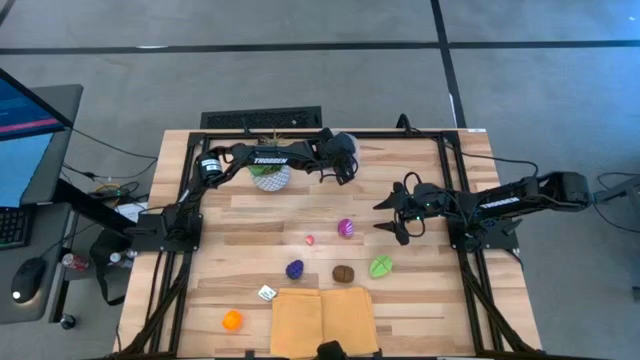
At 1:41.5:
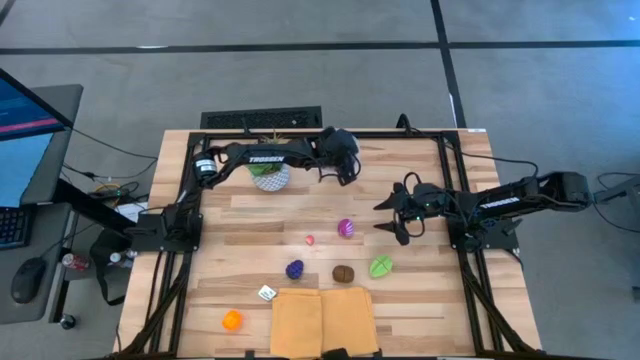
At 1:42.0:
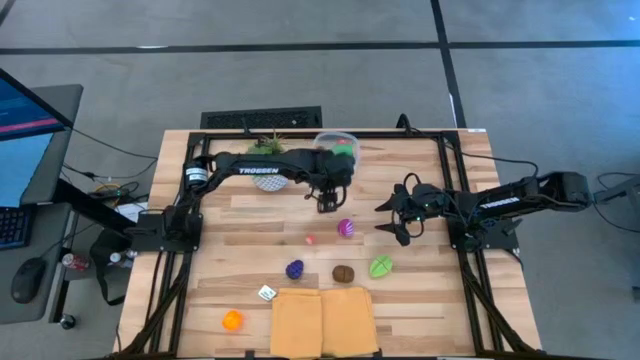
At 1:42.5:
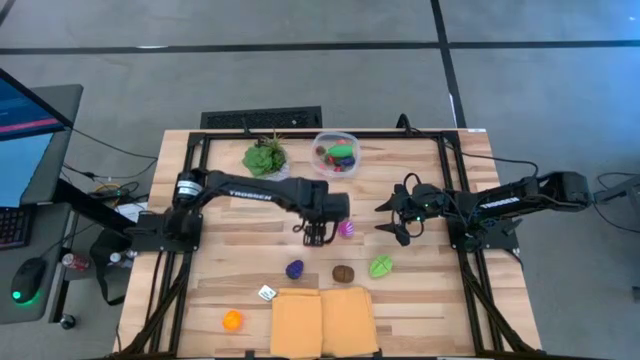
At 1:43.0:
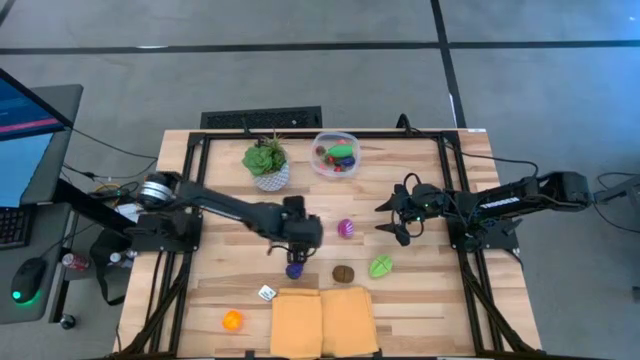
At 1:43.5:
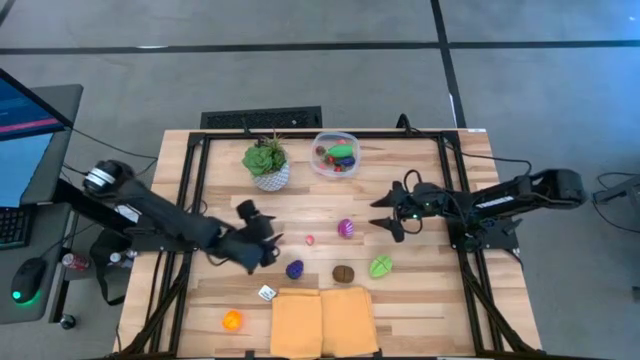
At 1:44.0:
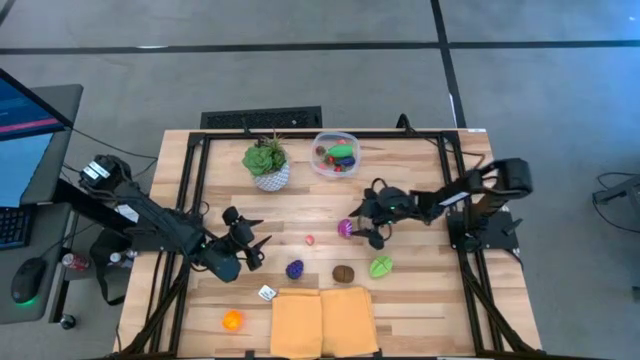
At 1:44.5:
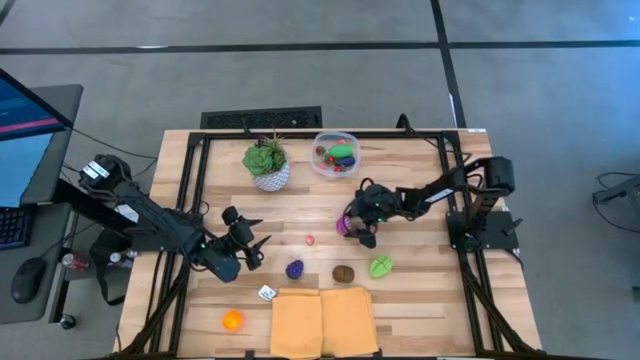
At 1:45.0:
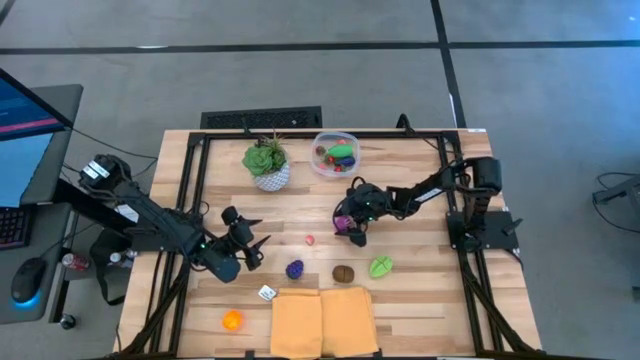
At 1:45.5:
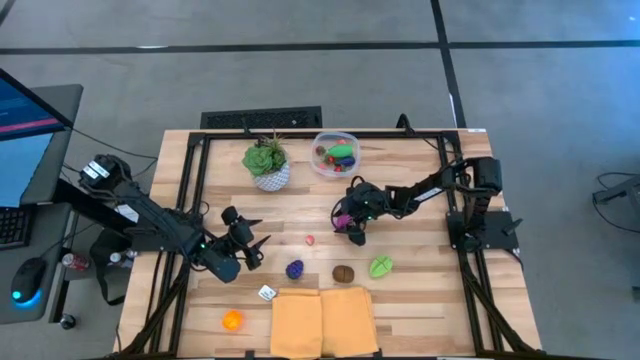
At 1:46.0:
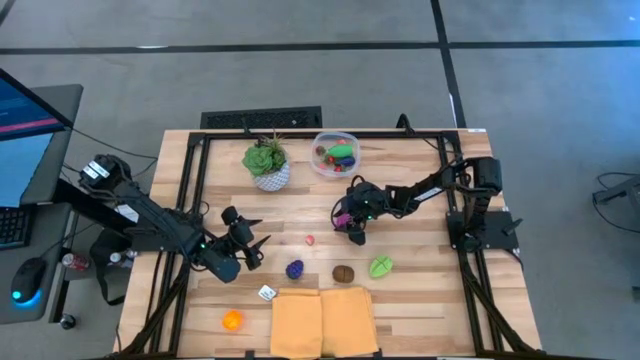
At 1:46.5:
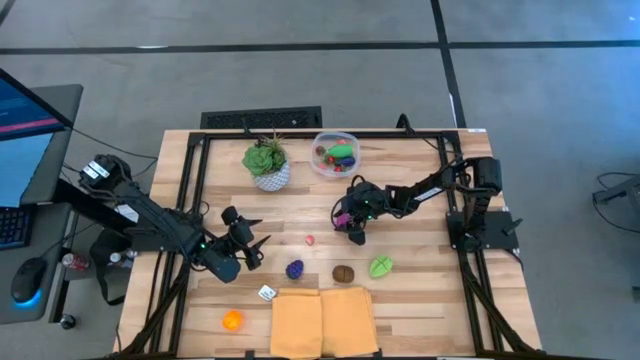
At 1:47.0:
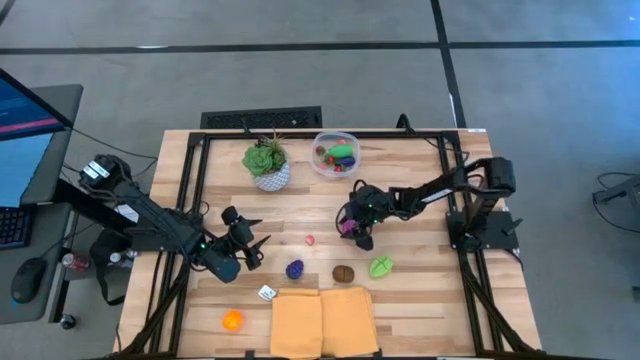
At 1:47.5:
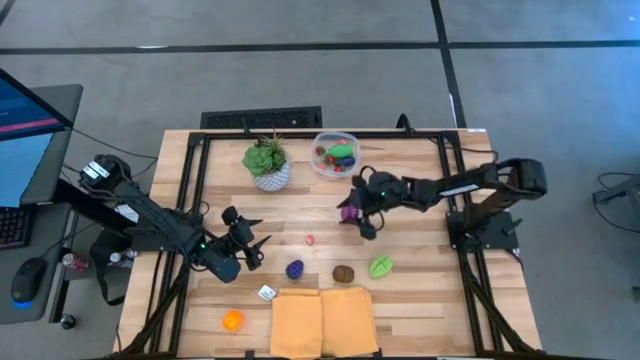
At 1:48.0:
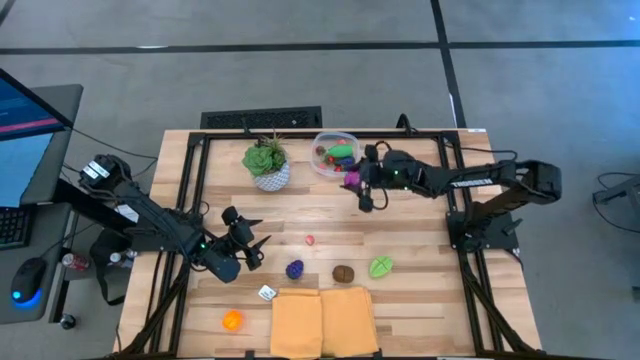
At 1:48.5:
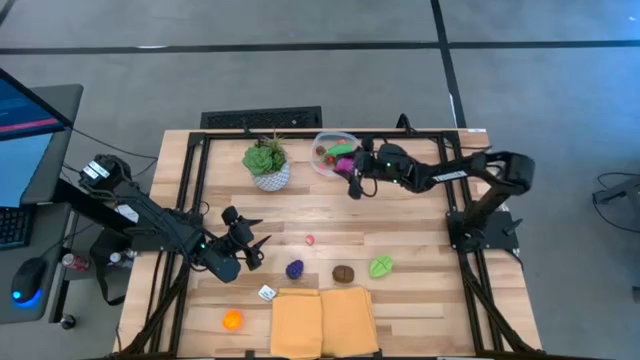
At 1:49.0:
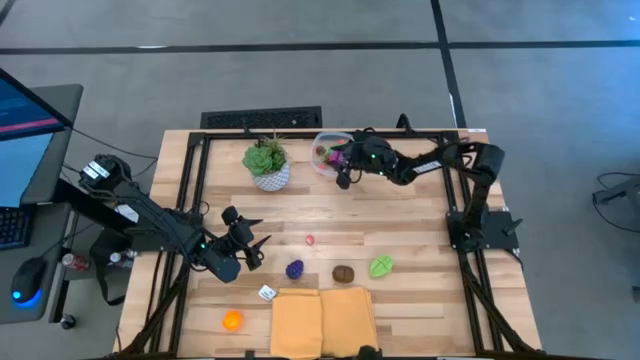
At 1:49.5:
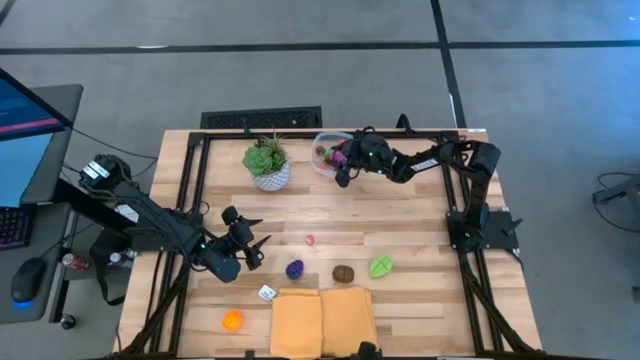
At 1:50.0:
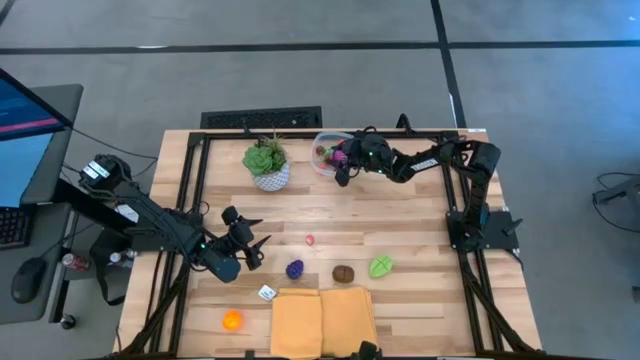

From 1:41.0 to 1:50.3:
Task: Pick and placing Produce into tupperware
Put the onion into the transparent bin

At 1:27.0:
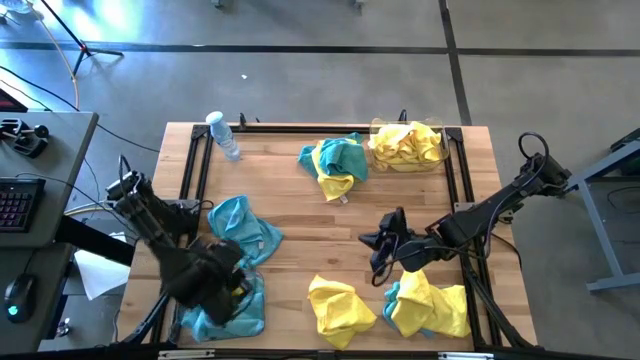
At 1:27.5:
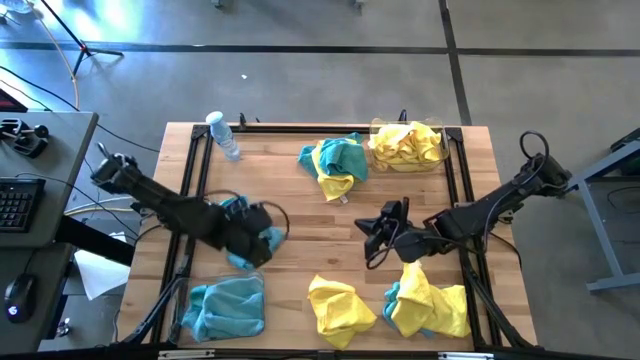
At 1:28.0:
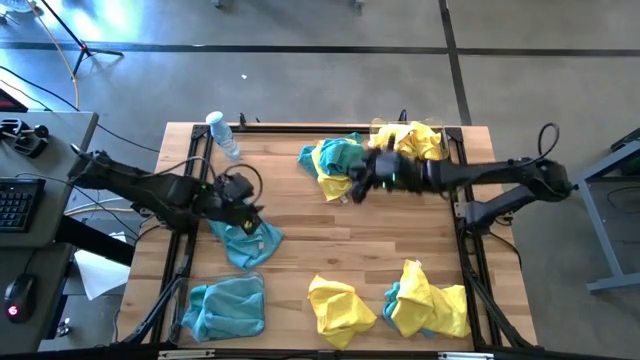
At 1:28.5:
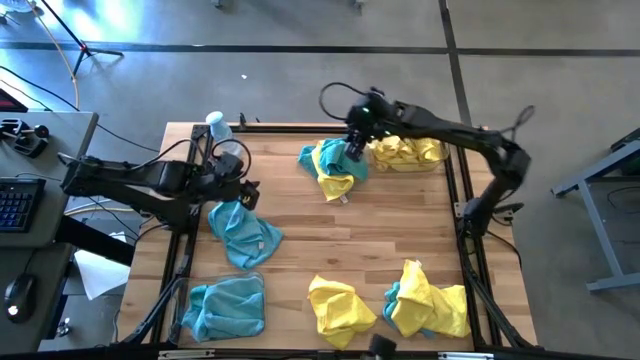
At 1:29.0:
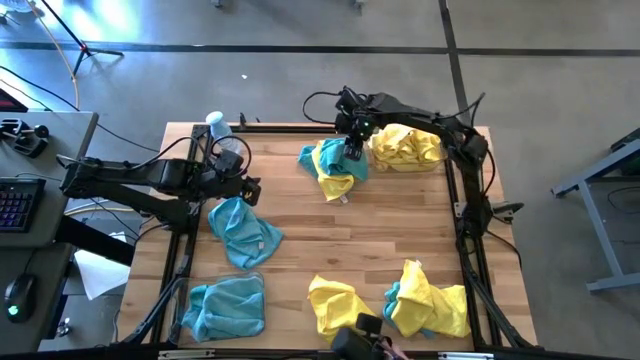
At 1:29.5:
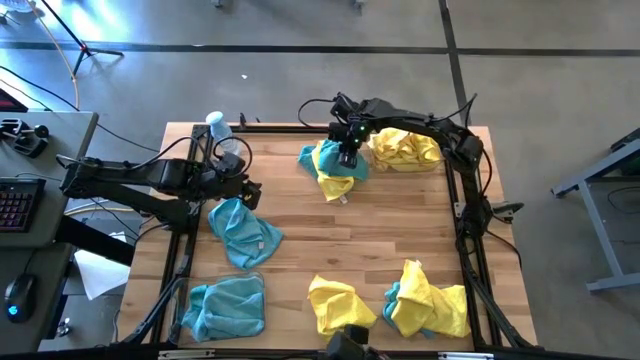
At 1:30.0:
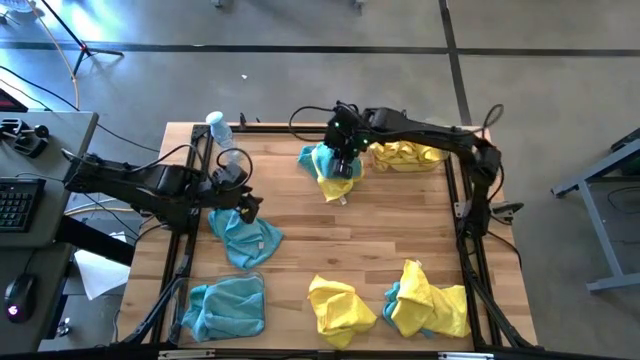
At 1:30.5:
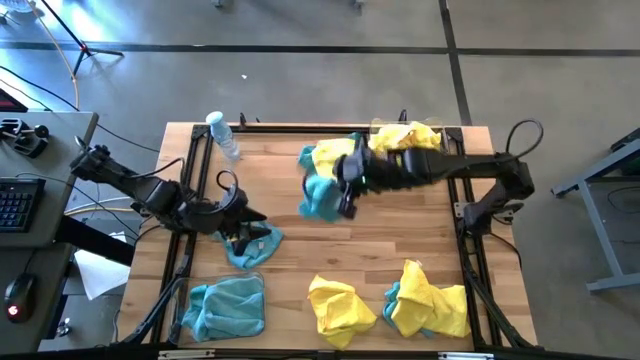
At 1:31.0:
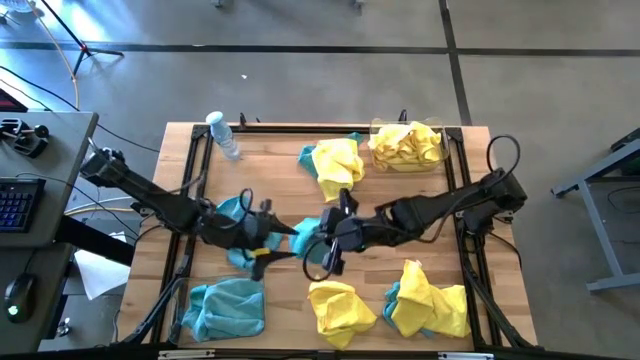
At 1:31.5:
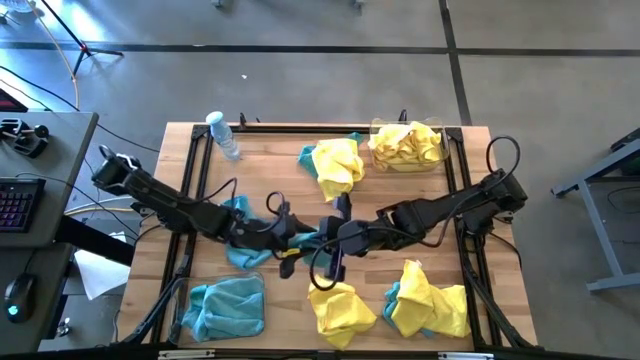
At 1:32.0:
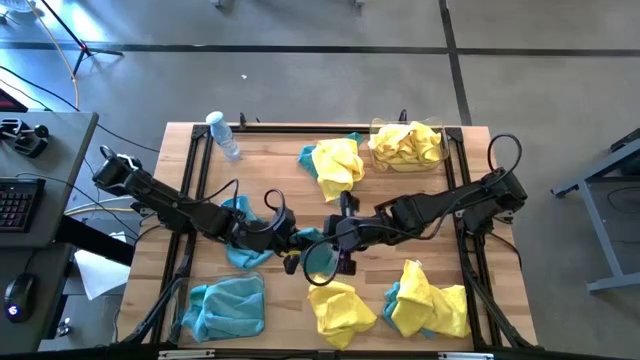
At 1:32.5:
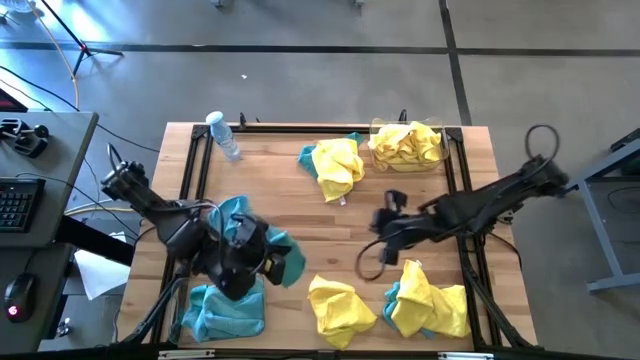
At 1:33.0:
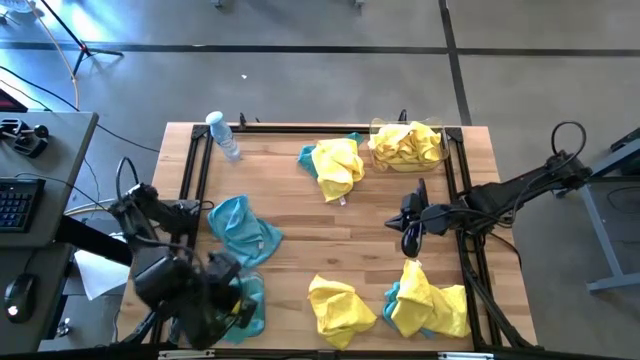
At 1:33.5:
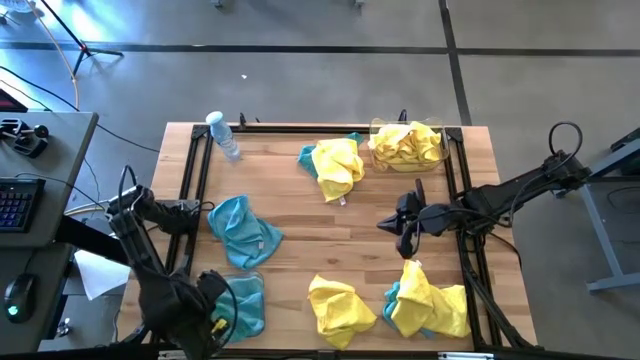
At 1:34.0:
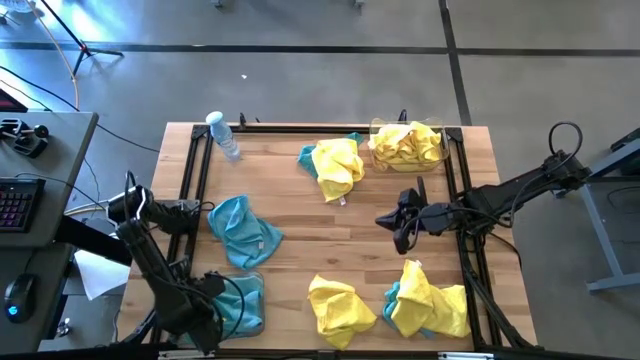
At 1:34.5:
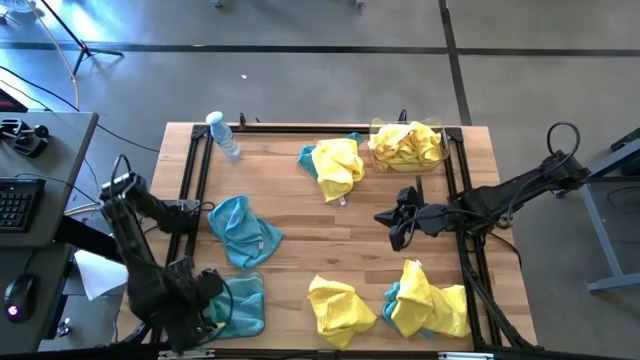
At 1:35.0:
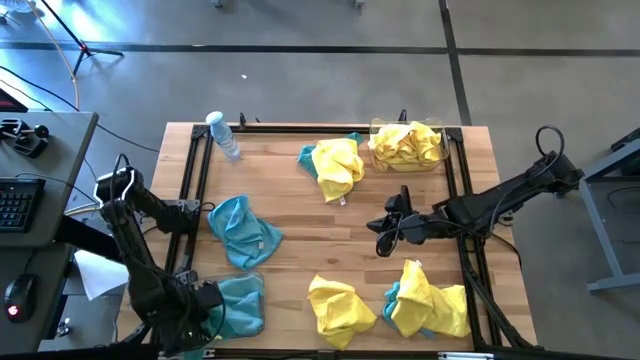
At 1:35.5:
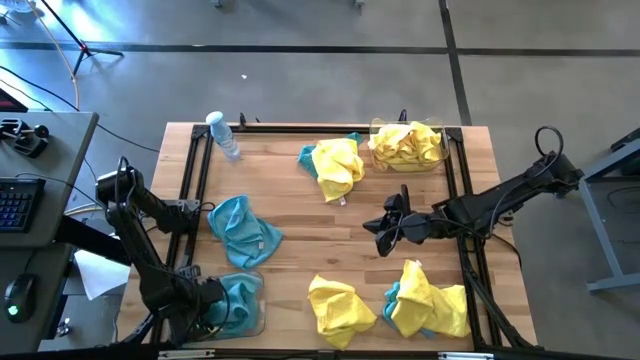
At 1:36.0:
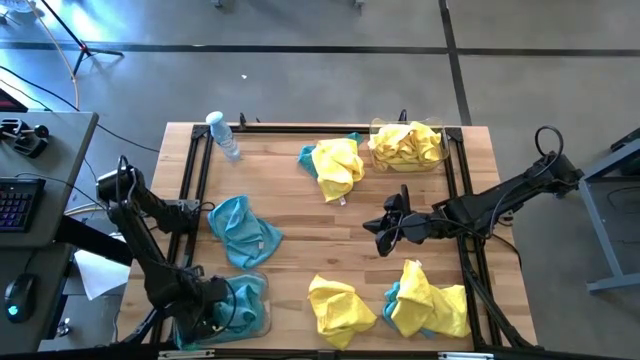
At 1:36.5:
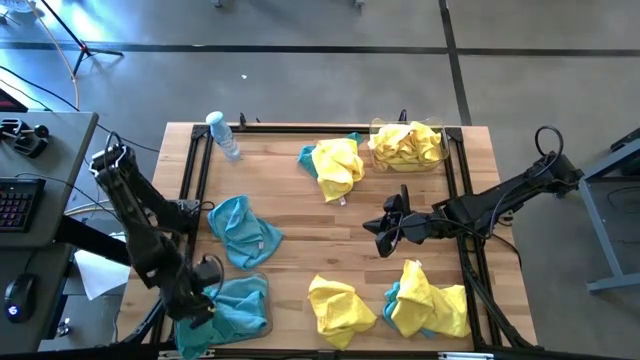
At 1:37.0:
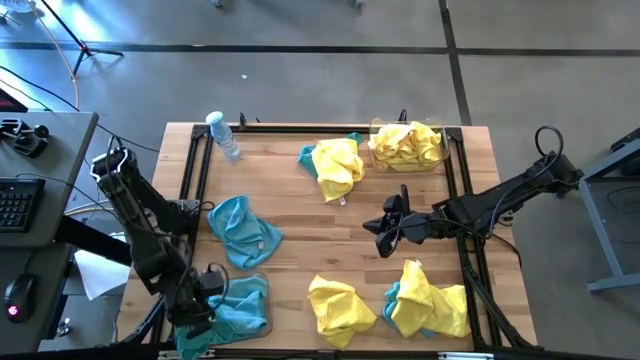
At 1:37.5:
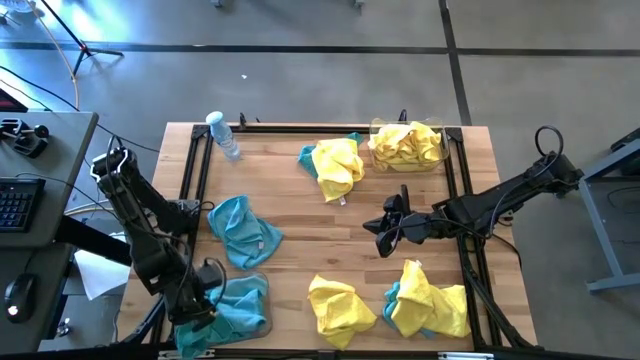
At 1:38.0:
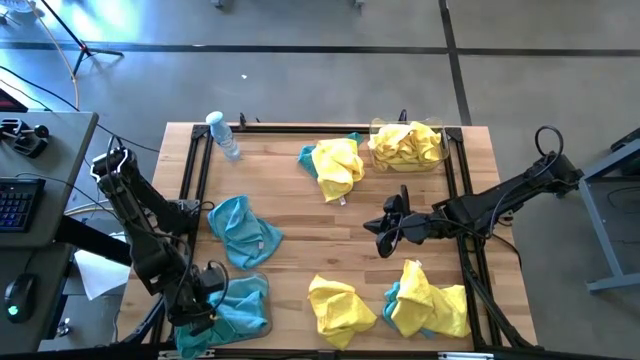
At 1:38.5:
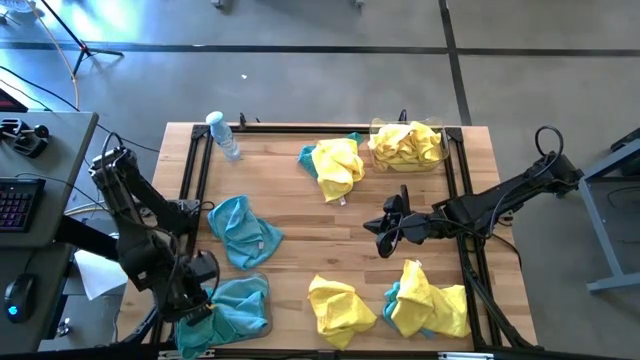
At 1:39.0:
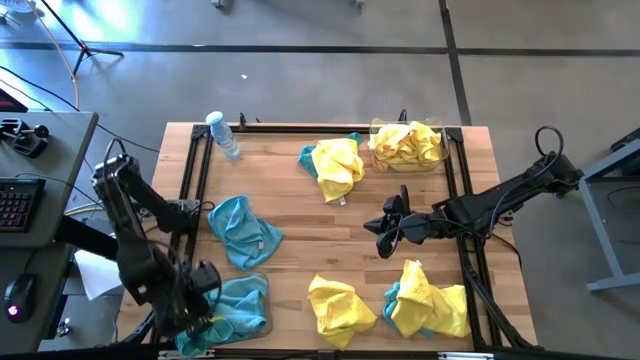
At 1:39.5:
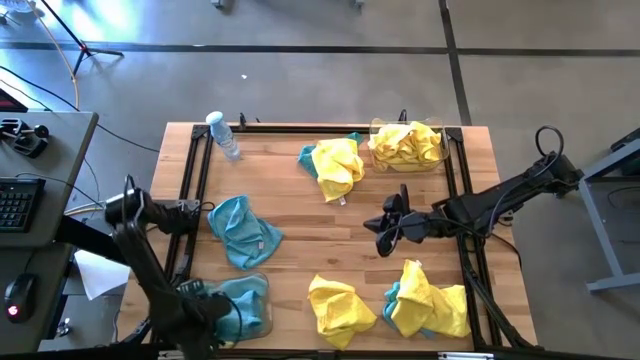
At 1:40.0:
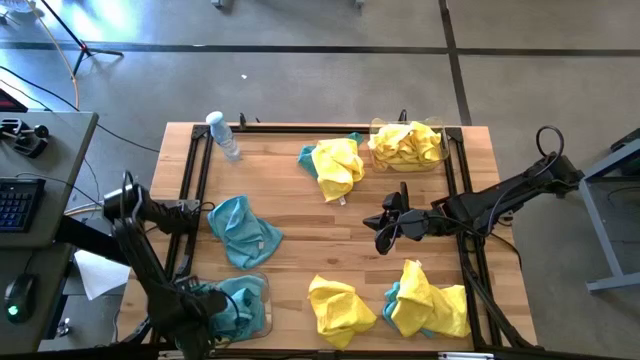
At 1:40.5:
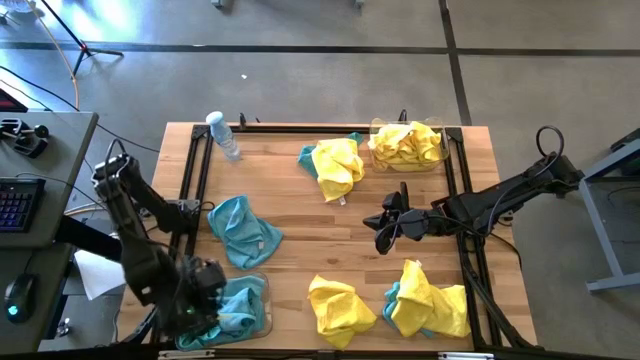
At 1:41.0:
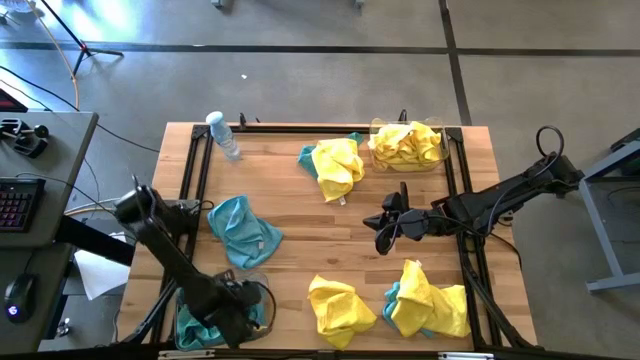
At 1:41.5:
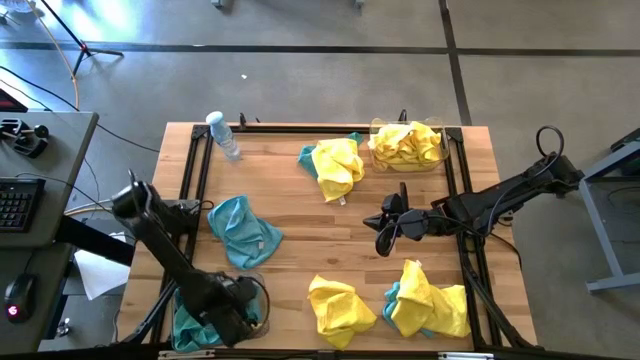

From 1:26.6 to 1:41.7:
Task: Sort microfiber towel by color & place in baskets
Put the blue microfiber towel into the bottom transparent bin
